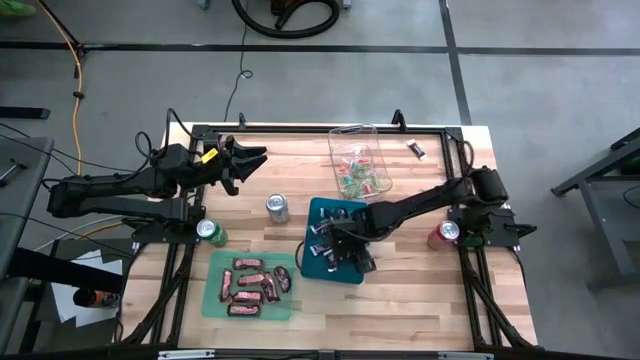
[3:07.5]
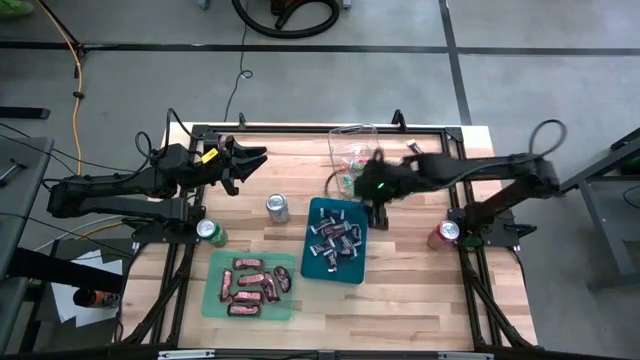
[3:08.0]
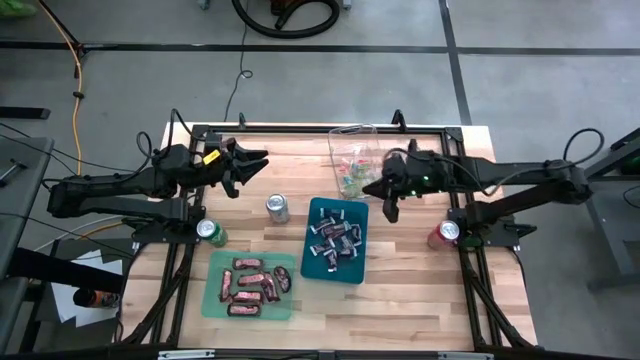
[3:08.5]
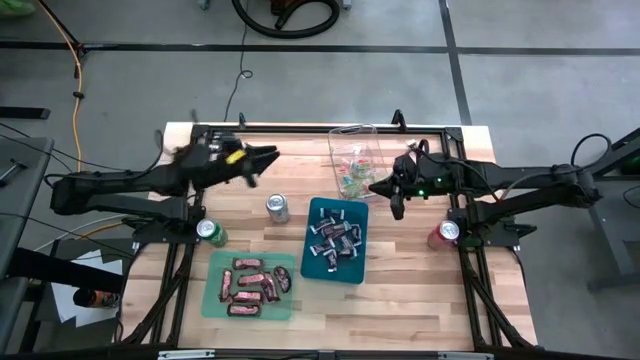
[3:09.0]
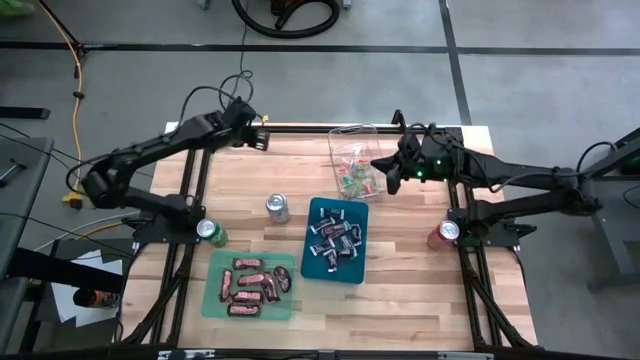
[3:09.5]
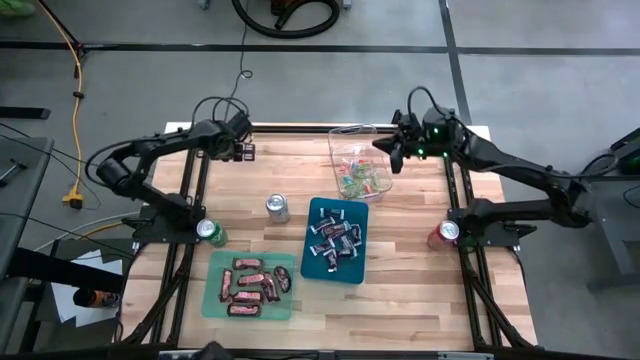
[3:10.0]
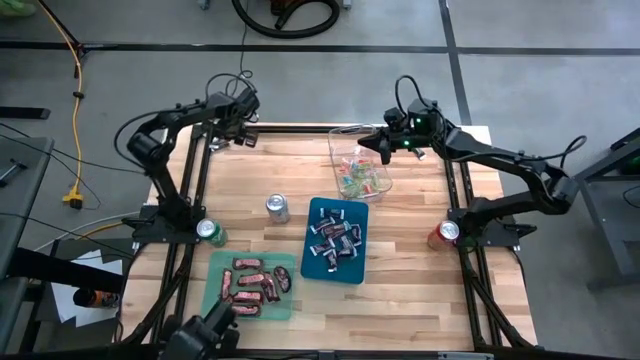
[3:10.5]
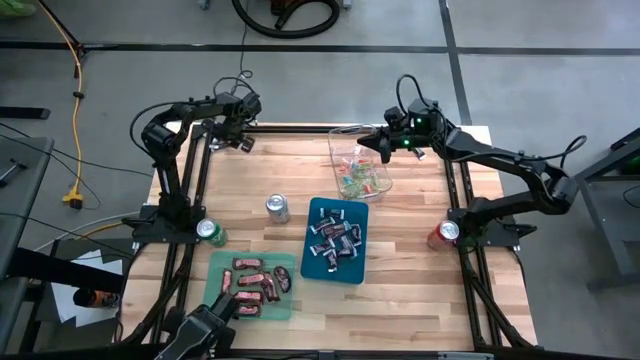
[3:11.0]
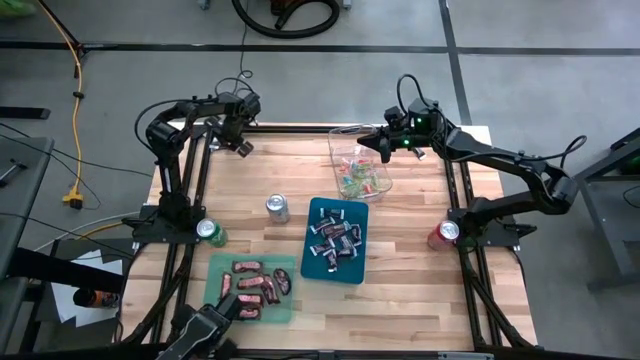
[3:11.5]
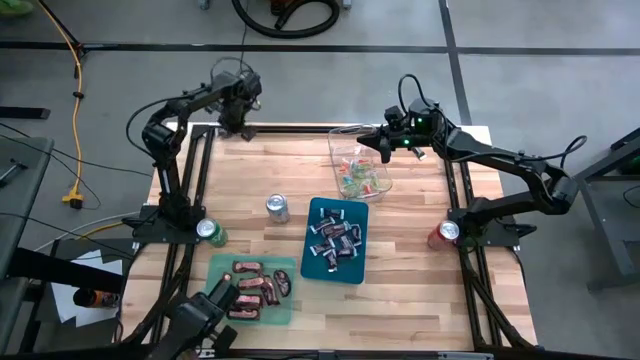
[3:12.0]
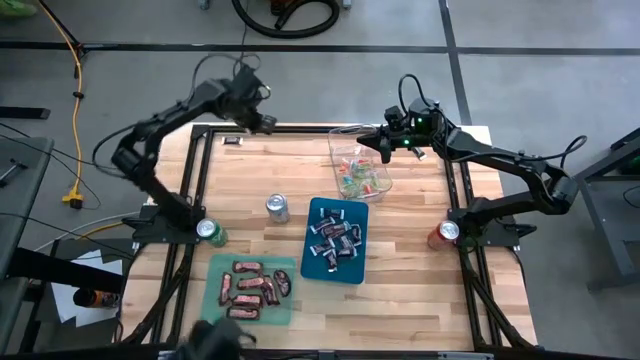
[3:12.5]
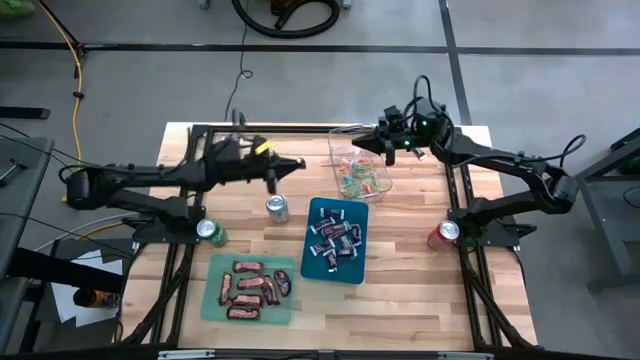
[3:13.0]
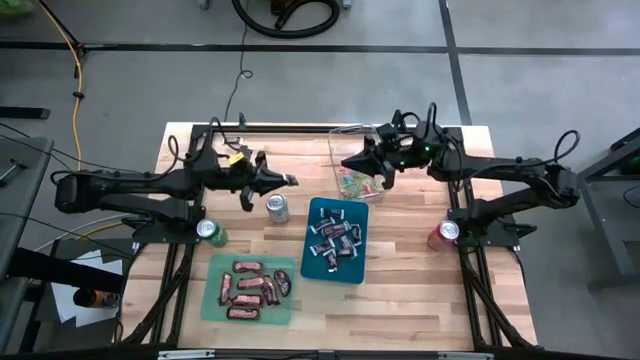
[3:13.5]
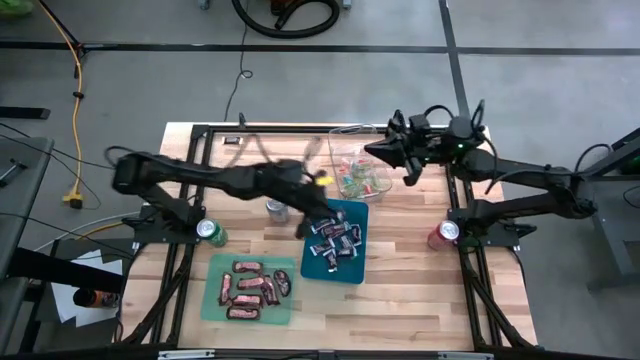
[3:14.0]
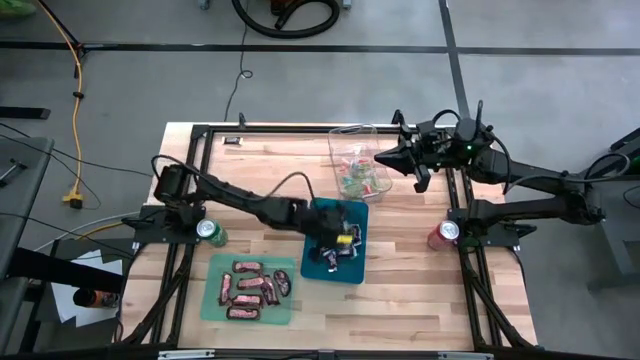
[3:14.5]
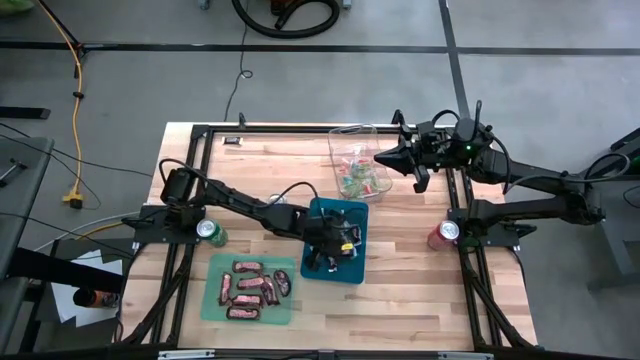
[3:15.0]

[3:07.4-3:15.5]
Task: Sort candy
Put the brown-white chocolate into the blue bin

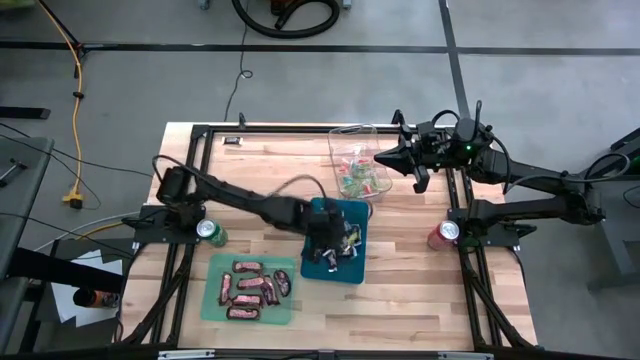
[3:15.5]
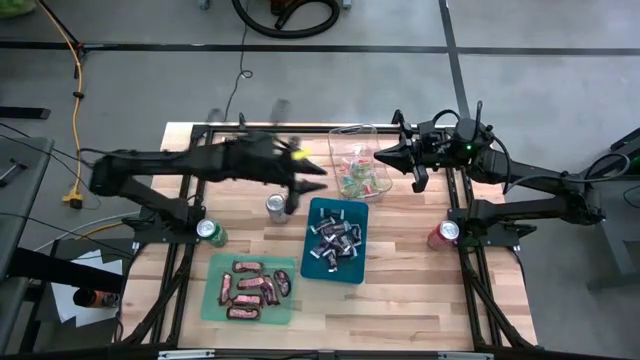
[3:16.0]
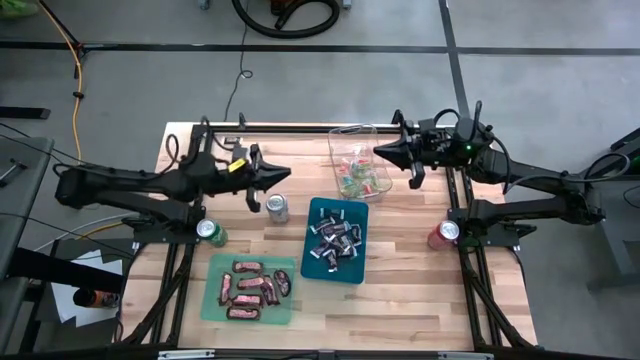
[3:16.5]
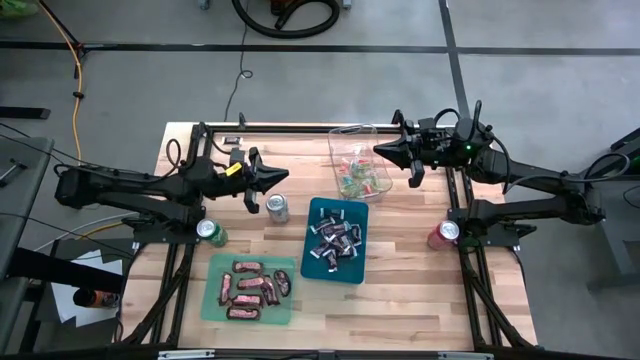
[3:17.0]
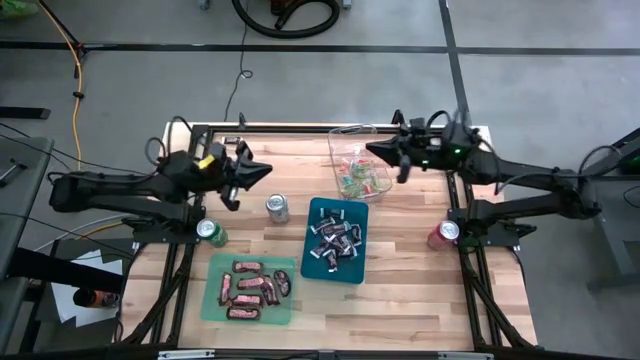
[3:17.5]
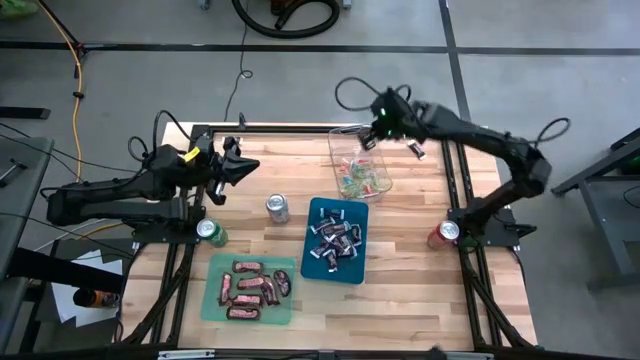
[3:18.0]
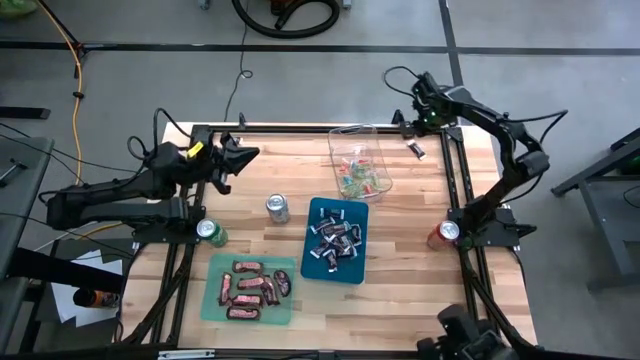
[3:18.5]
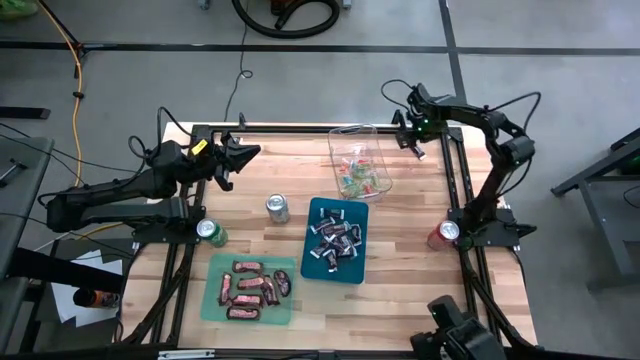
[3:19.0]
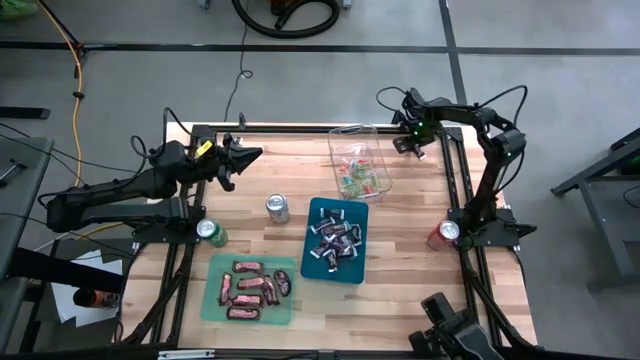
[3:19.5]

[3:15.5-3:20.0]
Put the brown-white chocolate into the blue bin

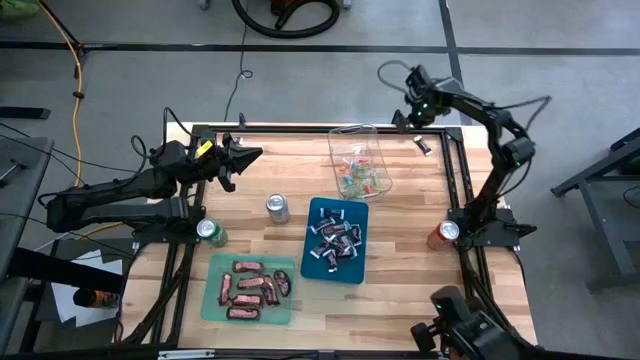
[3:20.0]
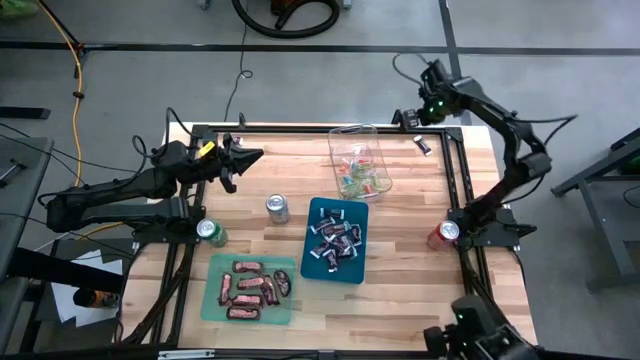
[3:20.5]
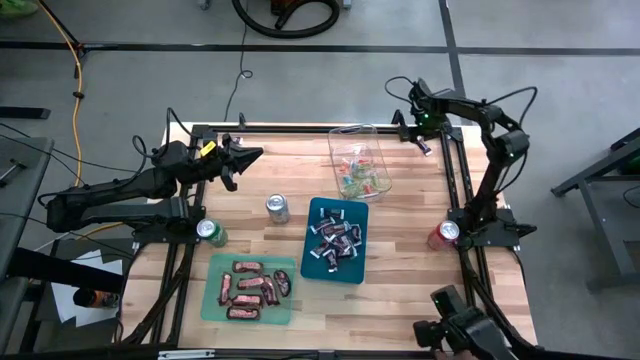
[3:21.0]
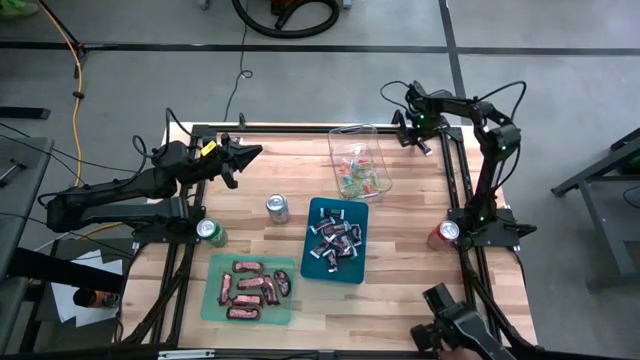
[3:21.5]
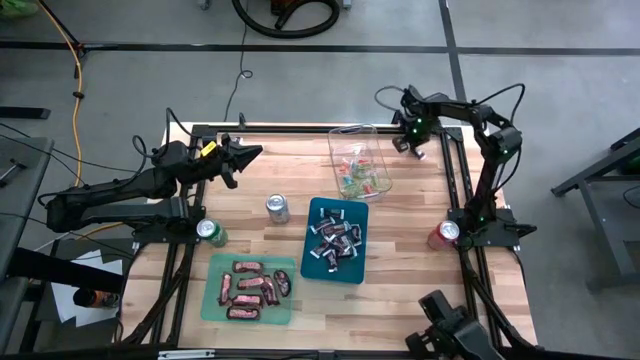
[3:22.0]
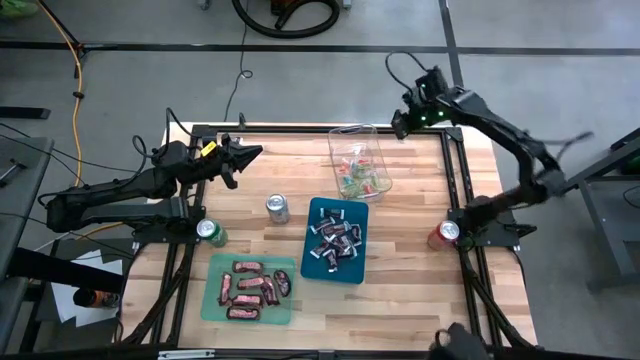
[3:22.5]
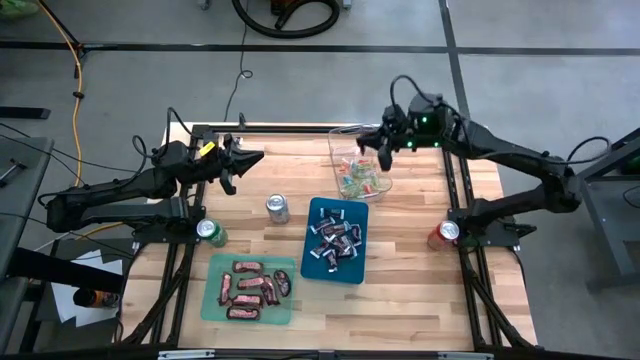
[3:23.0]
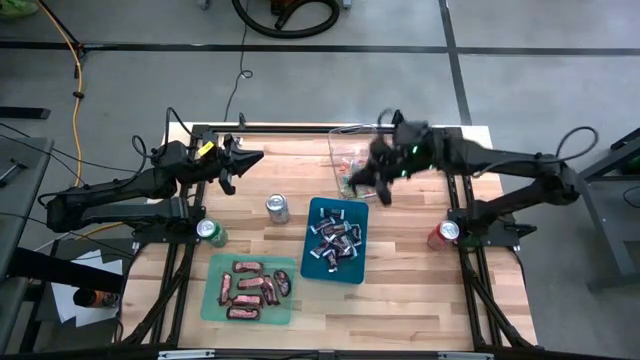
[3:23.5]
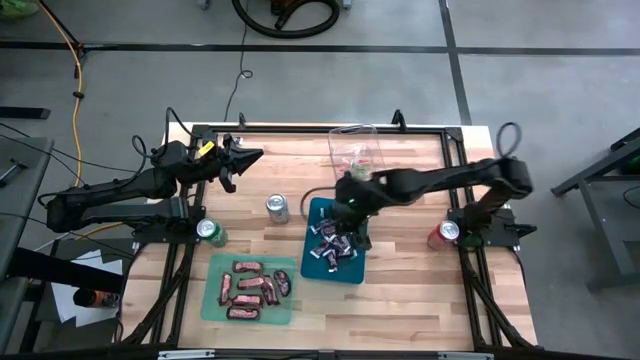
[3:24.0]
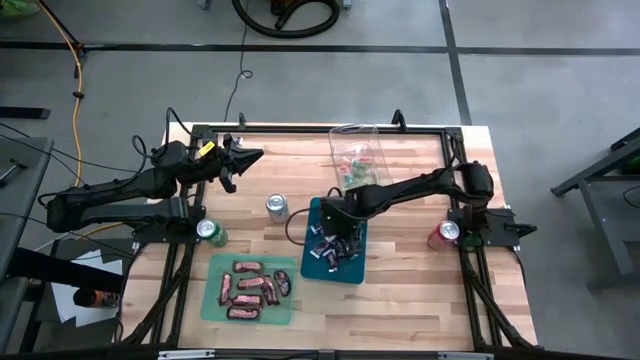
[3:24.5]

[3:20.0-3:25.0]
Put the brown-white chocolate into the blue bin

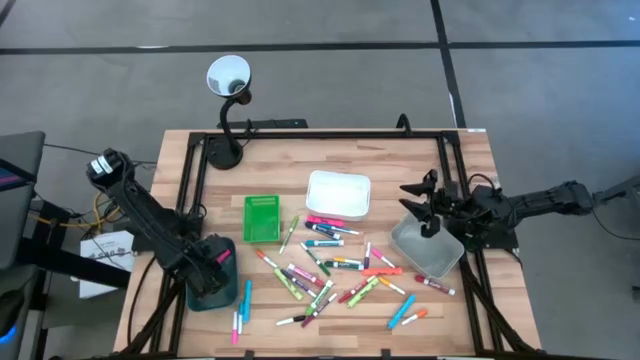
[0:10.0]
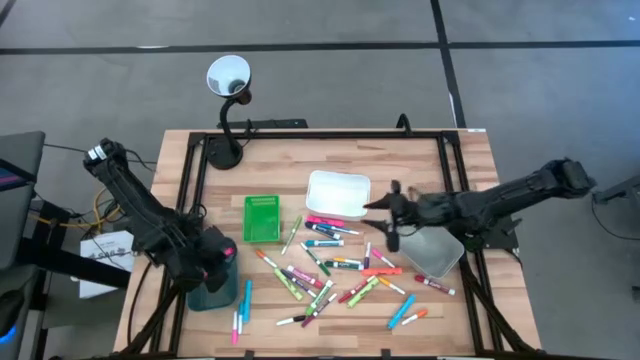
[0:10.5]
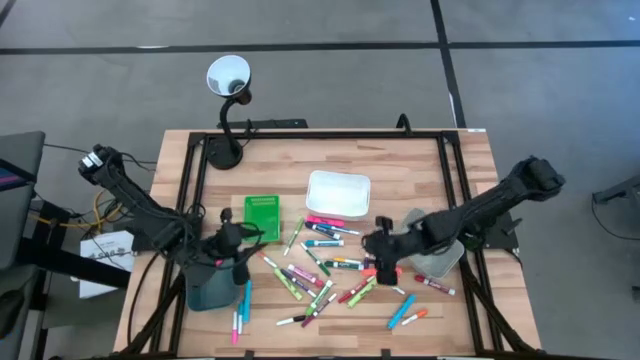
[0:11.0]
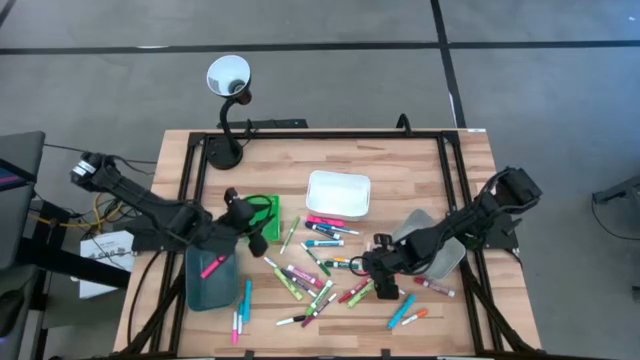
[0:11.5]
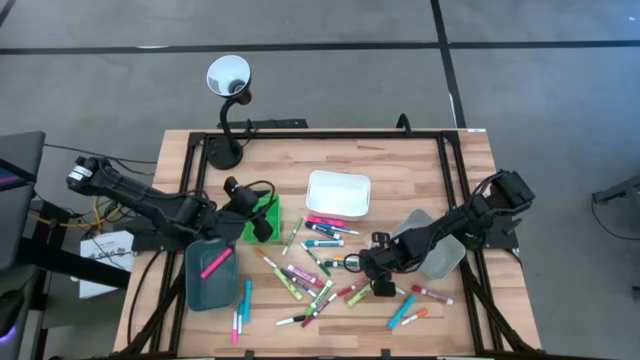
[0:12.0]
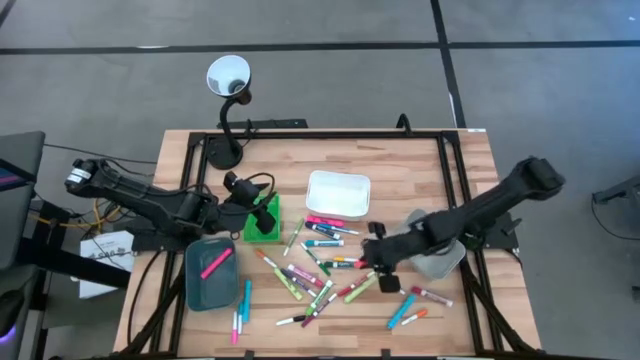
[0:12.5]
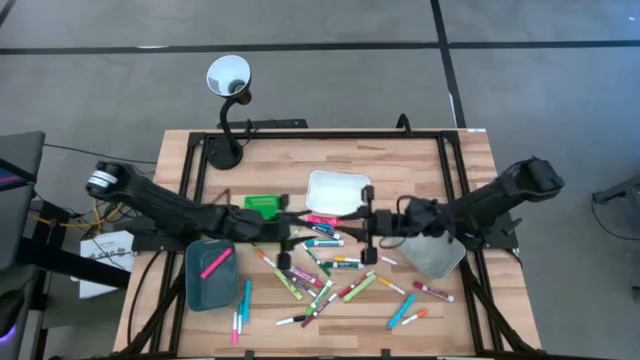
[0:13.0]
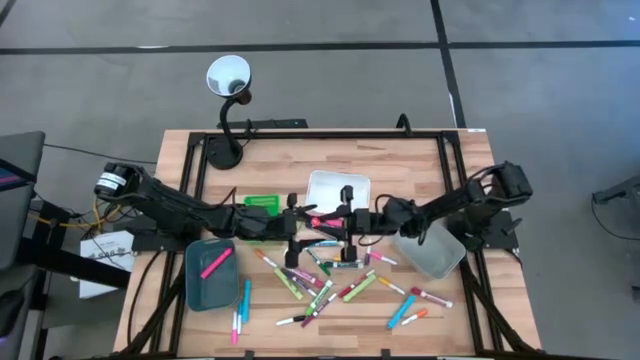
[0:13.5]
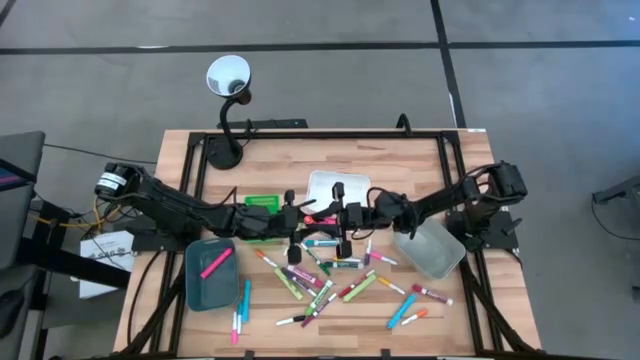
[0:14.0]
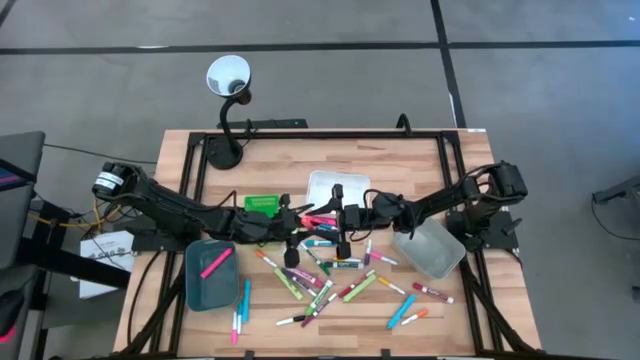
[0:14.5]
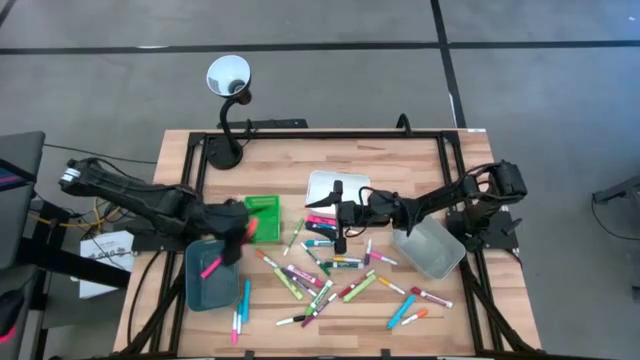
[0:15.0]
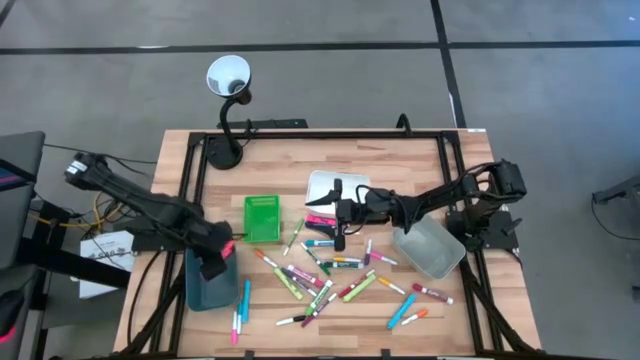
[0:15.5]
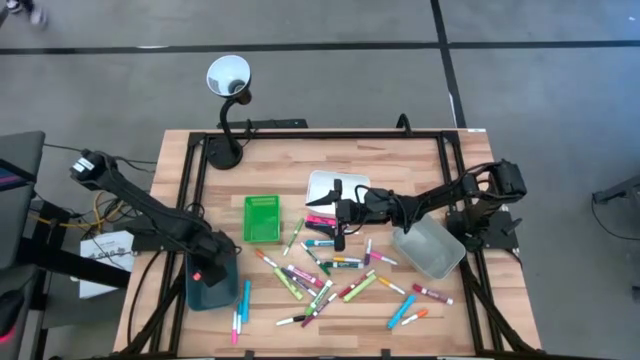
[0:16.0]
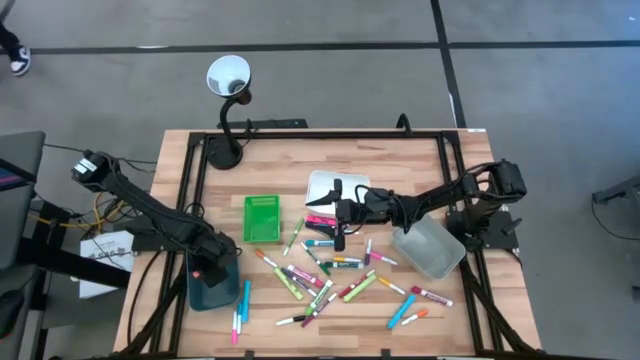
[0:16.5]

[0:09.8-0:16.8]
Task: Pick & Place Markers
Put the big orange highlighter pen into the blue bin
